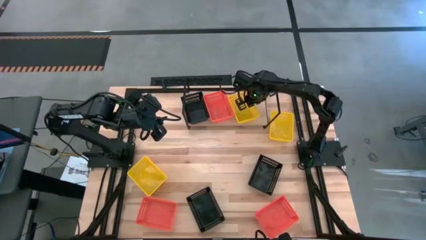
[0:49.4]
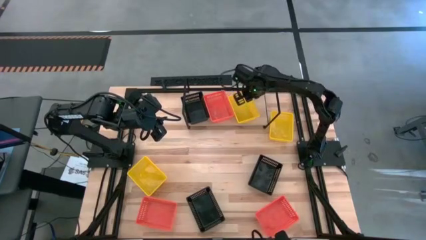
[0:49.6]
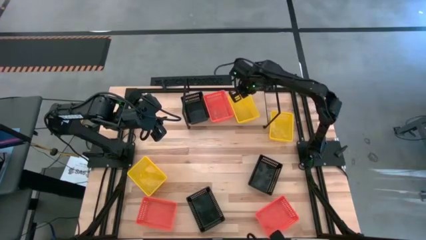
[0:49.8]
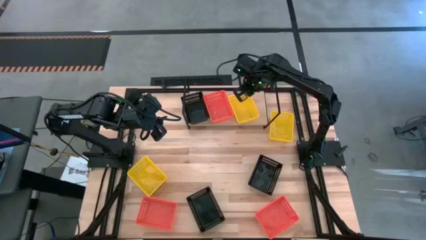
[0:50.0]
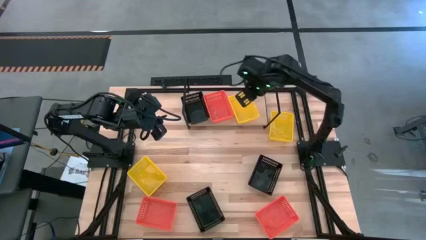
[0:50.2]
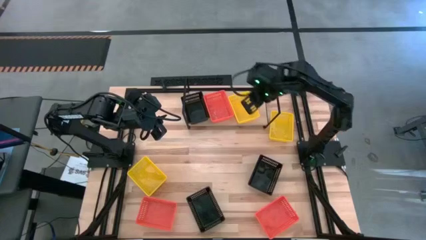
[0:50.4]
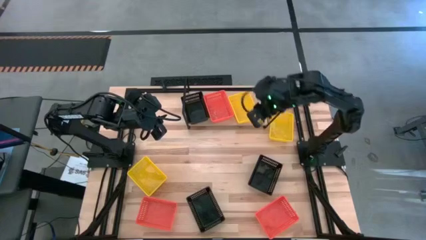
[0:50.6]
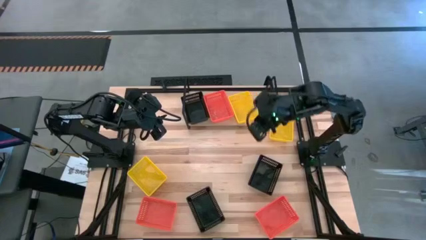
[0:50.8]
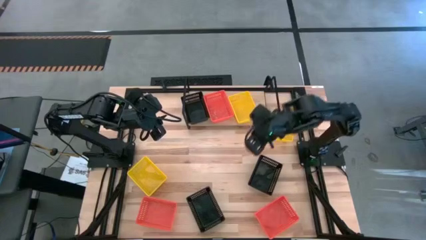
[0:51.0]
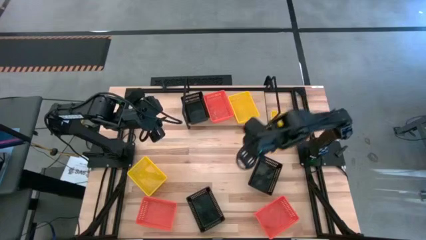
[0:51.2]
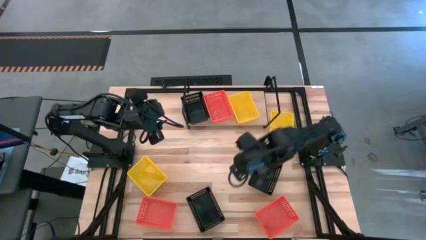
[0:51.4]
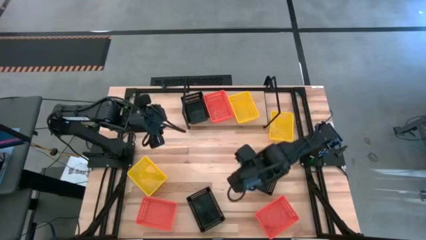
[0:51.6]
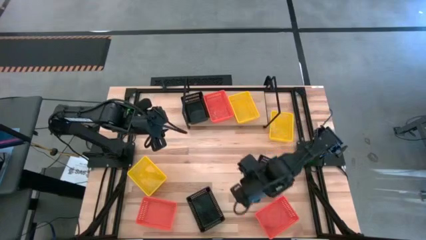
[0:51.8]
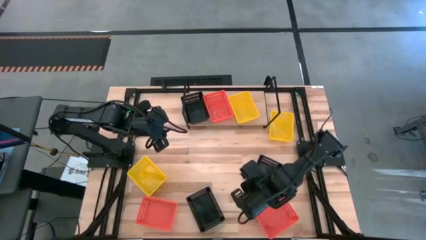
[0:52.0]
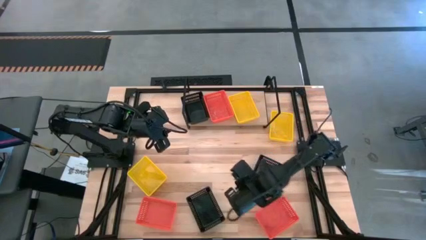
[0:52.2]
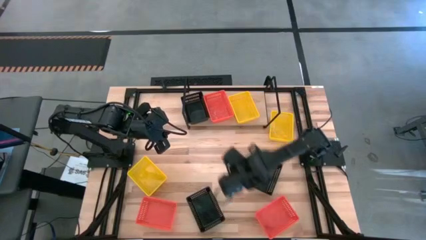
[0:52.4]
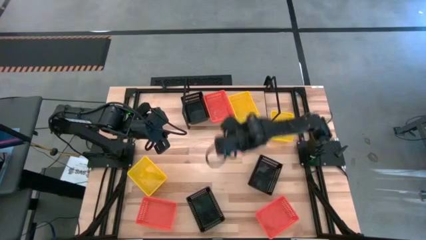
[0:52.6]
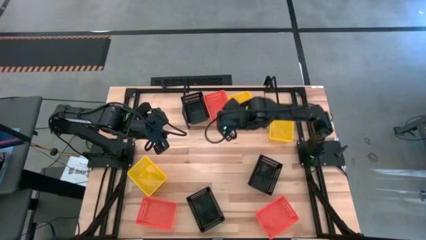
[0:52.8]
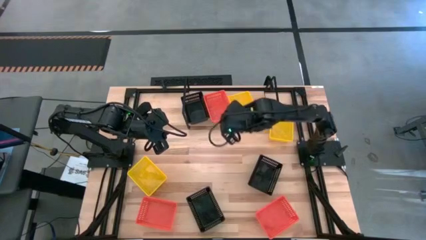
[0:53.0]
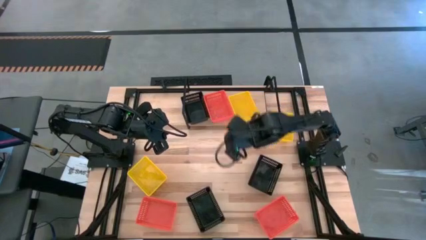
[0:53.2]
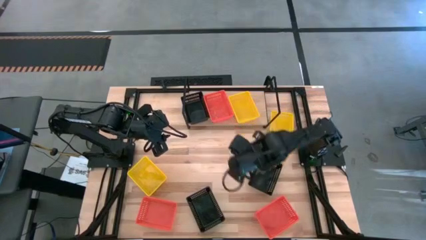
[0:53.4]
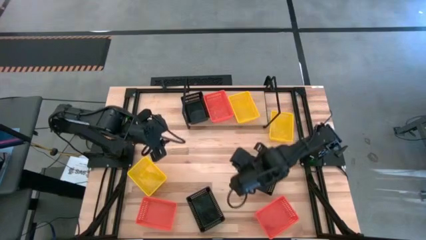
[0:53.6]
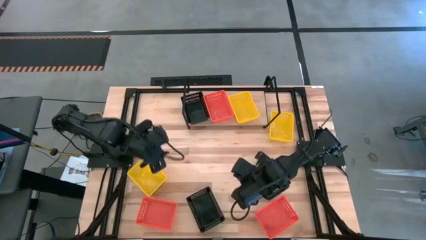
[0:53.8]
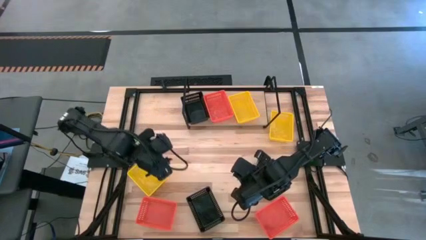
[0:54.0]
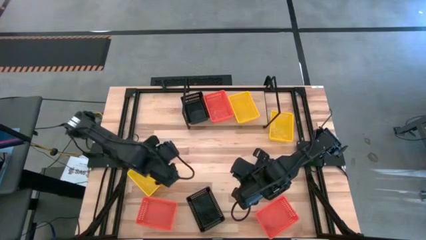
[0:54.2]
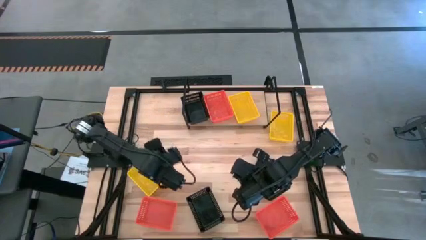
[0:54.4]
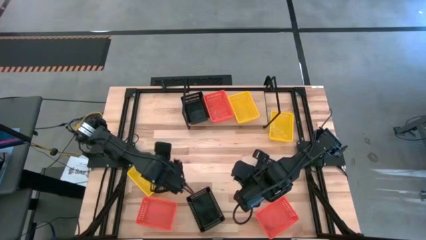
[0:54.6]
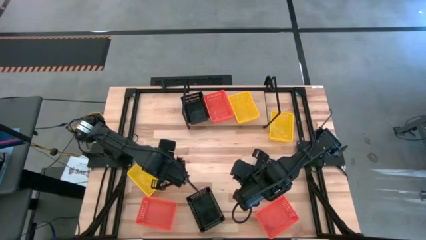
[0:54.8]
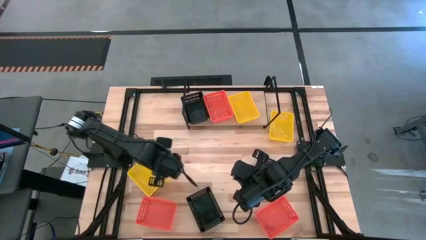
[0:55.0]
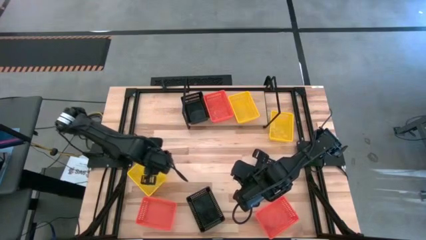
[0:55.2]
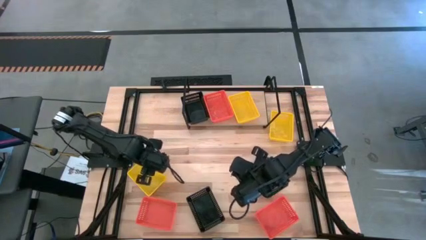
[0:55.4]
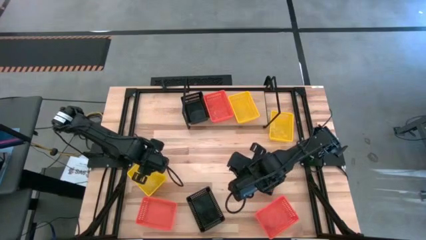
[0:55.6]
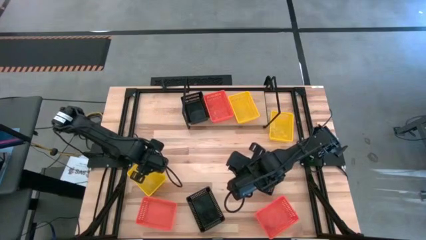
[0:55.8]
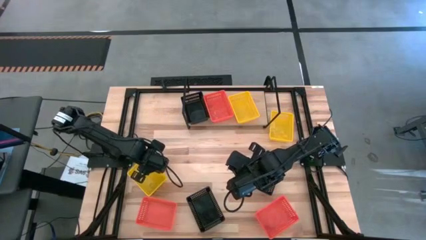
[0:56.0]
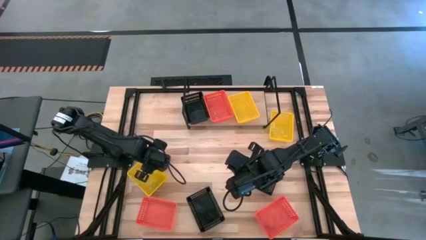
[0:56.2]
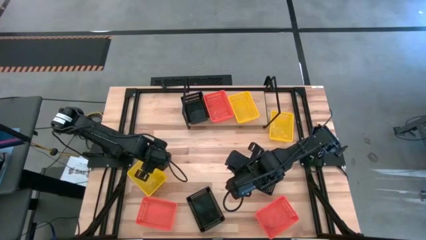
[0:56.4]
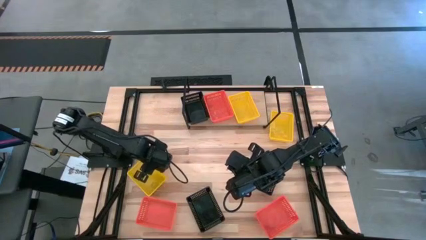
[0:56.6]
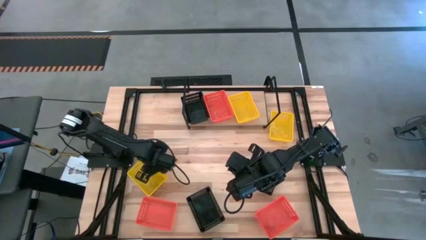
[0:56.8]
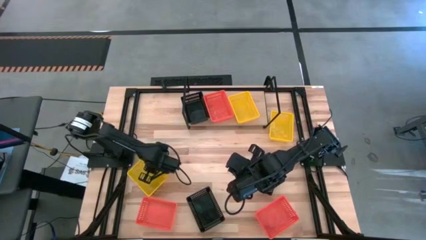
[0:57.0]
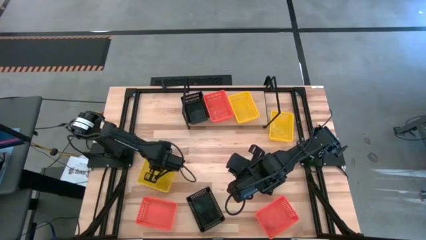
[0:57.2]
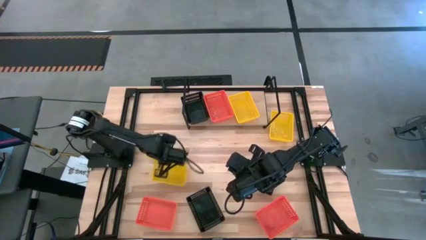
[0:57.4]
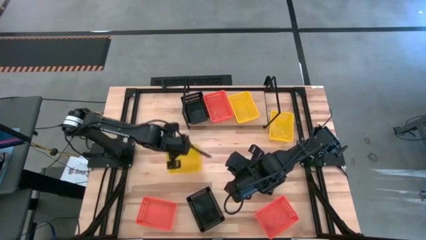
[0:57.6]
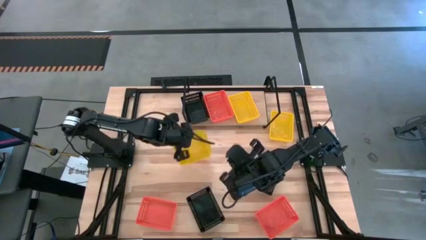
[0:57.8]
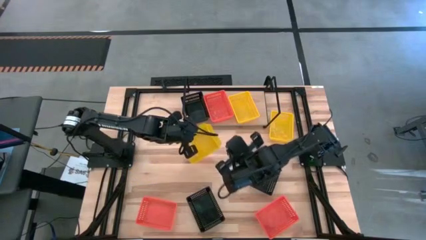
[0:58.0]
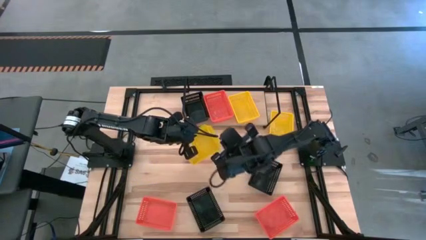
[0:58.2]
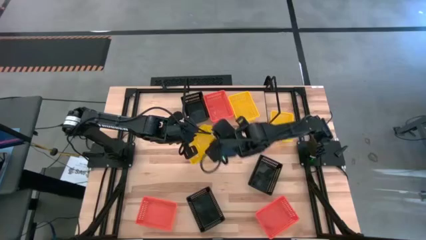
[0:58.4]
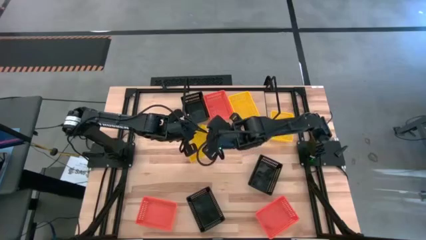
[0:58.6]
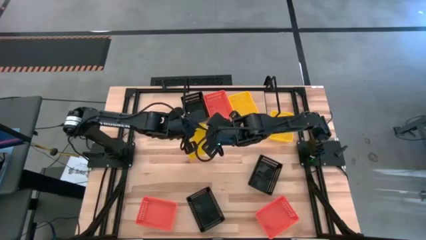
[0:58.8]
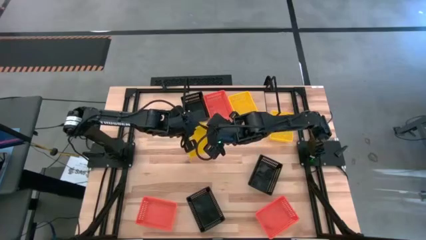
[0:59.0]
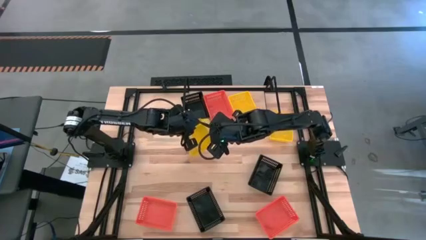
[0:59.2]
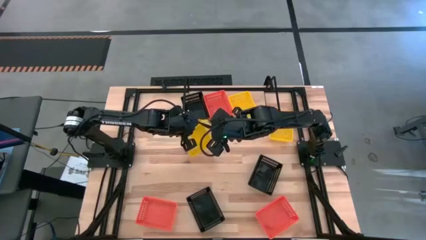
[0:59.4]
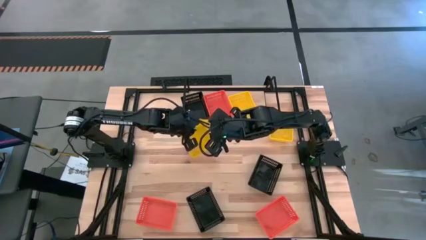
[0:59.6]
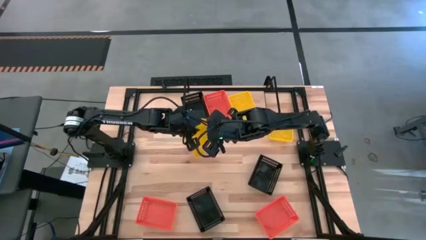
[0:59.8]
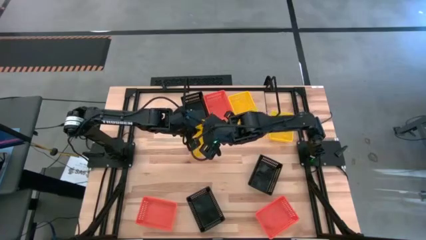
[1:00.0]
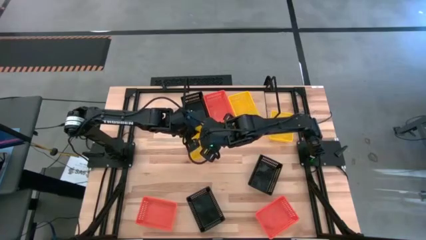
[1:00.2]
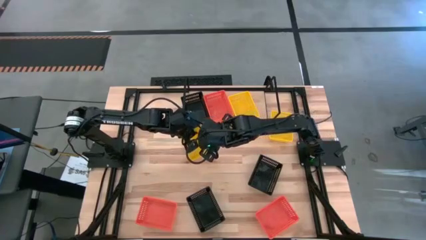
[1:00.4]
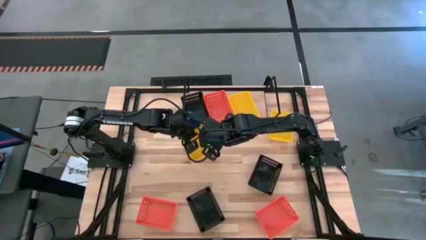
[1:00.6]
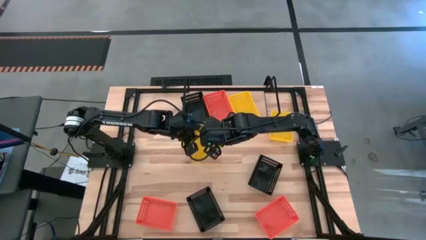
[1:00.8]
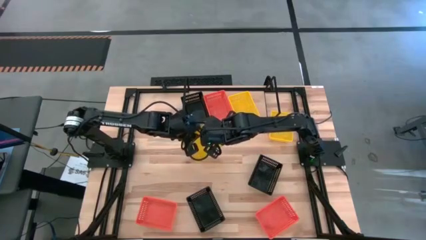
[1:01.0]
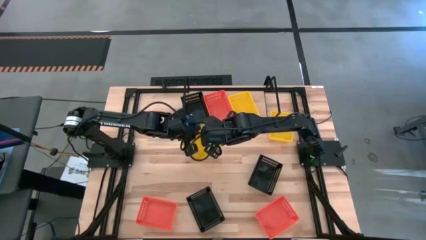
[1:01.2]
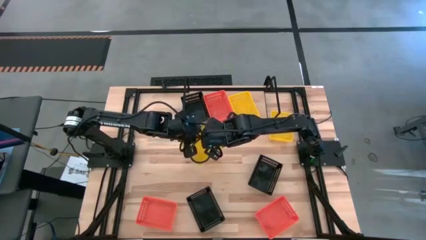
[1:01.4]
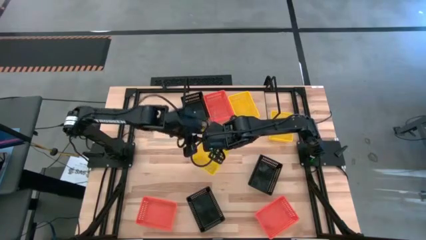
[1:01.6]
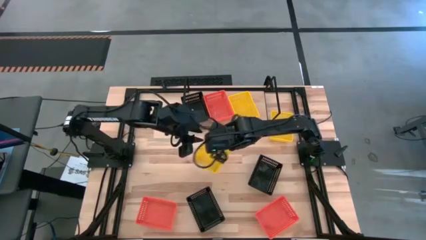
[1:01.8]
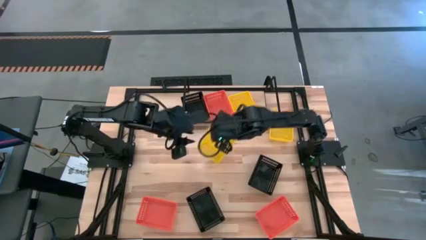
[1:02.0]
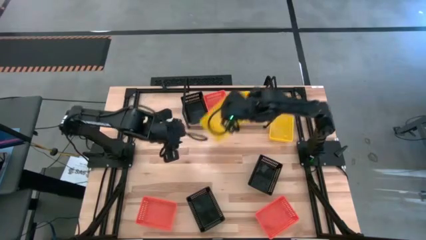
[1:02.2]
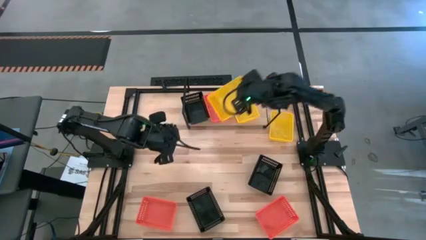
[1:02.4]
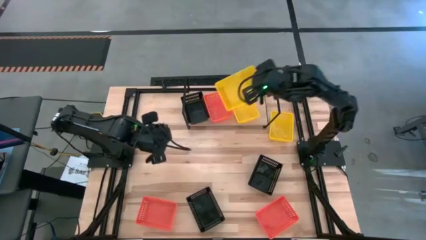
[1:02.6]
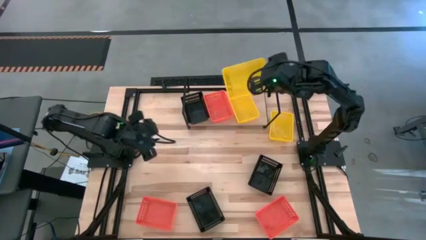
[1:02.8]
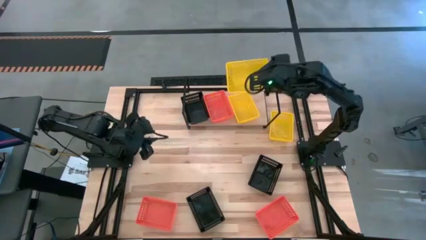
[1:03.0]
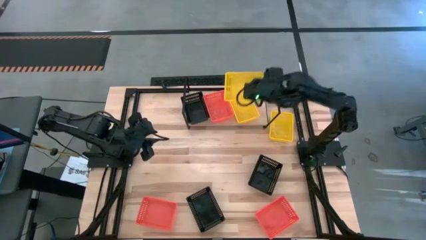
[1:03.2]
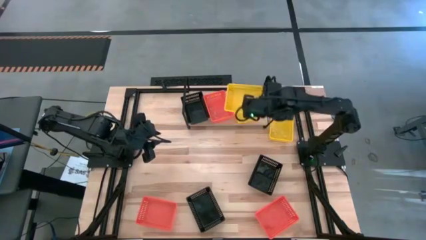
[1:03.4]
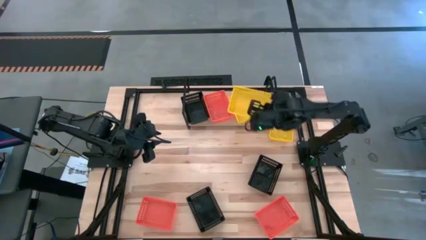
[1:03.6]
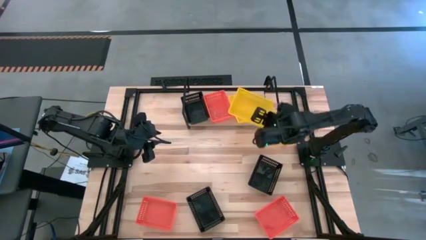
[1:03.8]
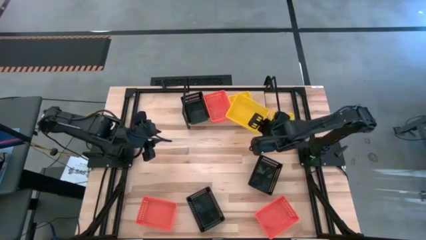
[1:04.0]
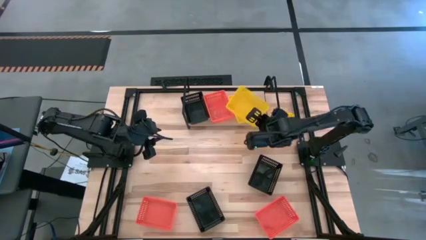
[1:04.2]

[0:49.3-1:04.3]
Task: Stack baskets on shelf by color
Stack the bottom yellow bin on top of the other yellow bin on the shelf
